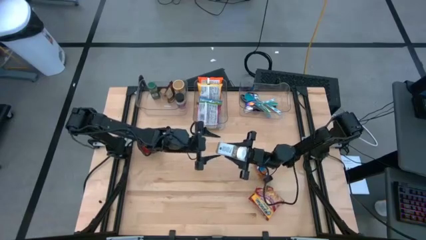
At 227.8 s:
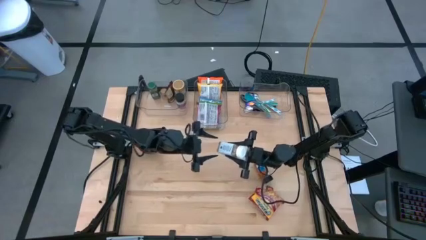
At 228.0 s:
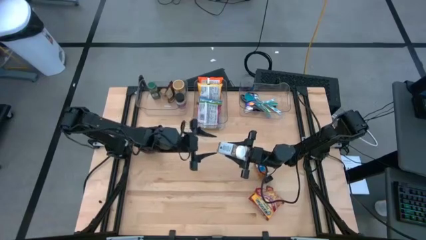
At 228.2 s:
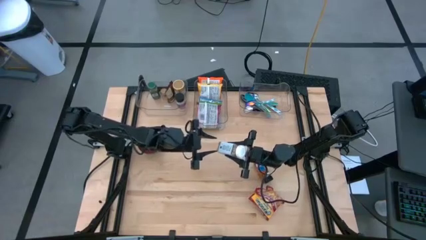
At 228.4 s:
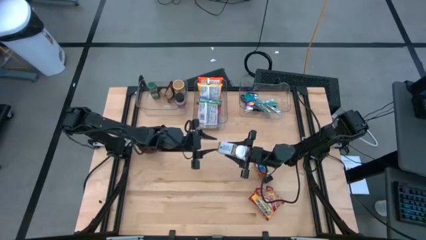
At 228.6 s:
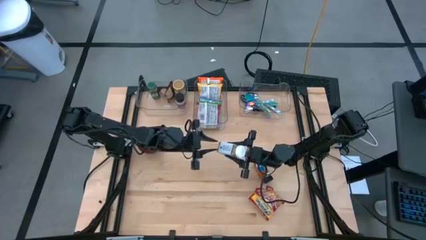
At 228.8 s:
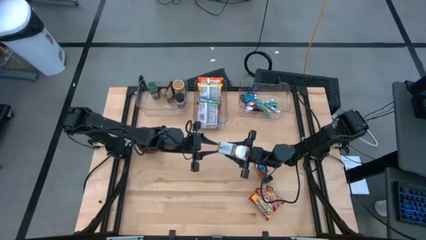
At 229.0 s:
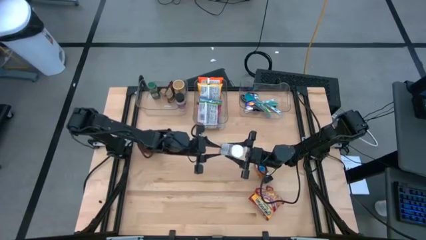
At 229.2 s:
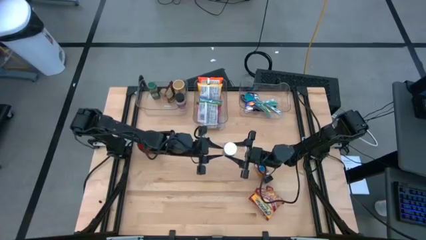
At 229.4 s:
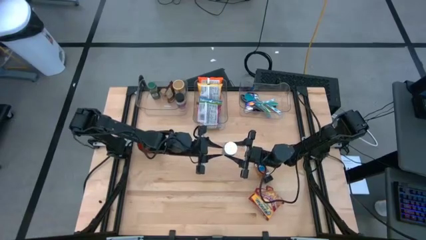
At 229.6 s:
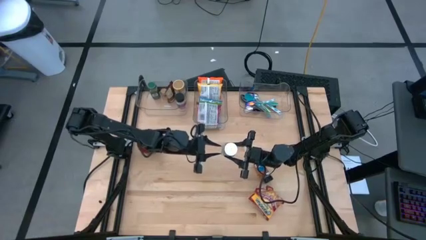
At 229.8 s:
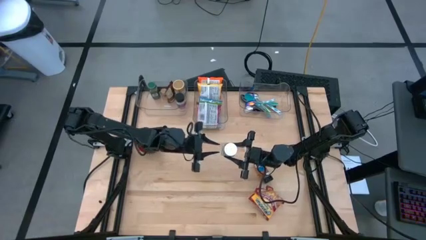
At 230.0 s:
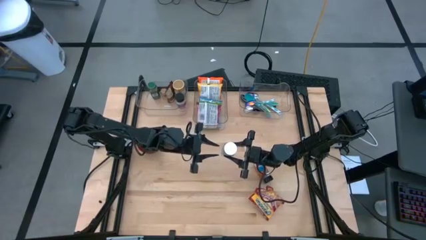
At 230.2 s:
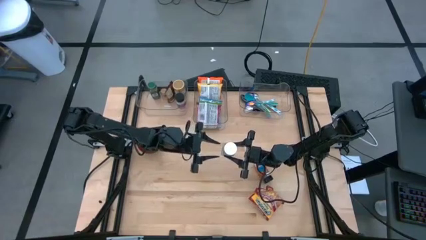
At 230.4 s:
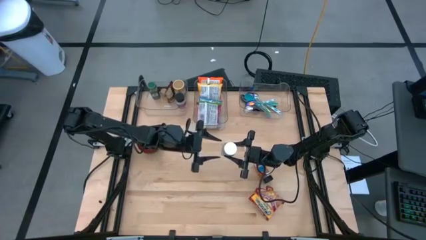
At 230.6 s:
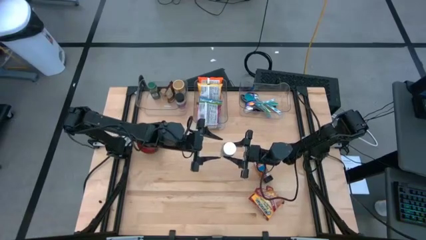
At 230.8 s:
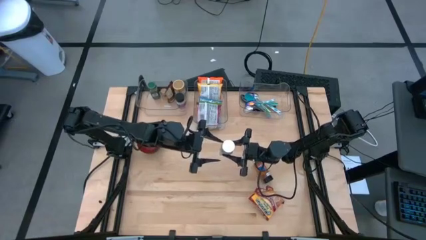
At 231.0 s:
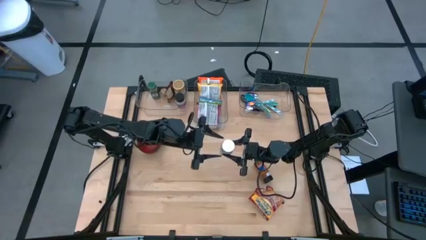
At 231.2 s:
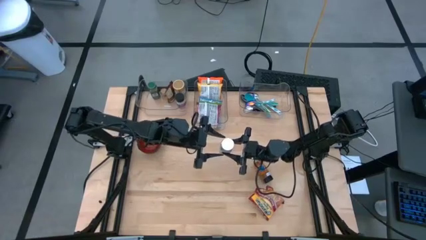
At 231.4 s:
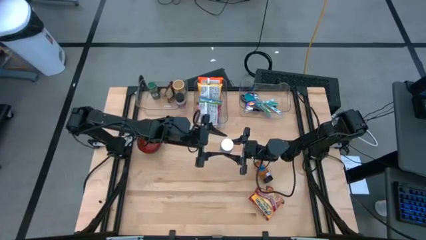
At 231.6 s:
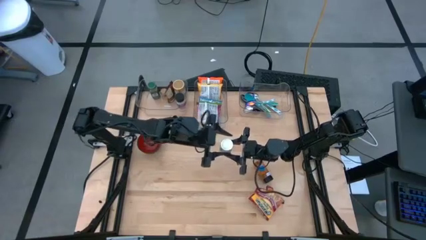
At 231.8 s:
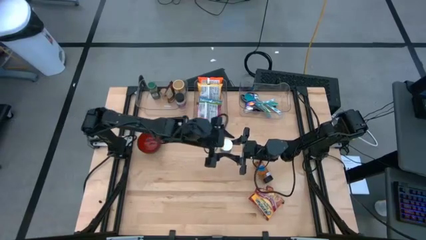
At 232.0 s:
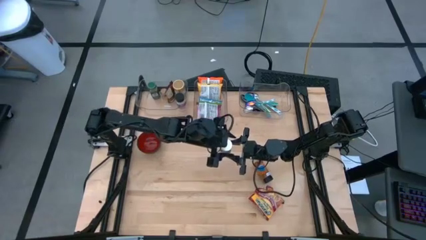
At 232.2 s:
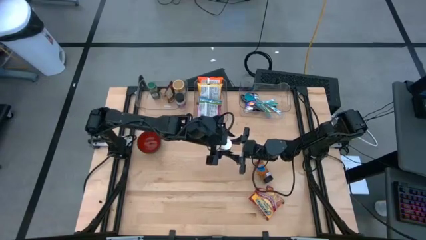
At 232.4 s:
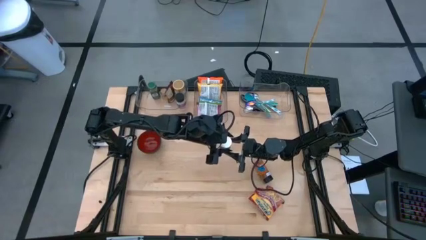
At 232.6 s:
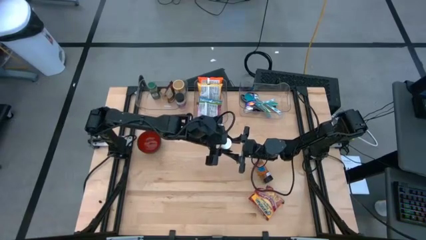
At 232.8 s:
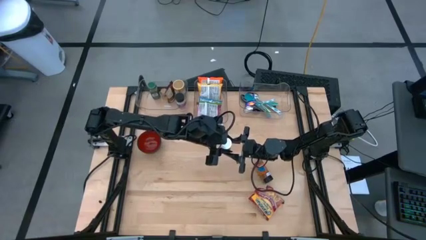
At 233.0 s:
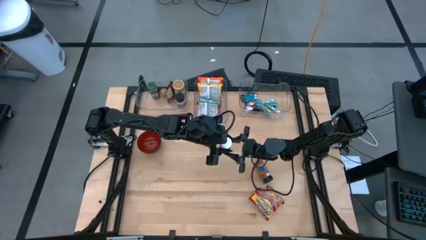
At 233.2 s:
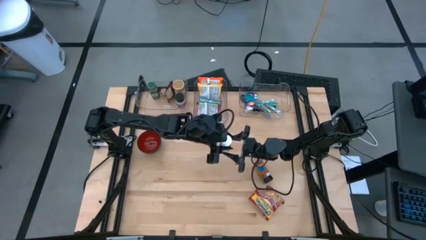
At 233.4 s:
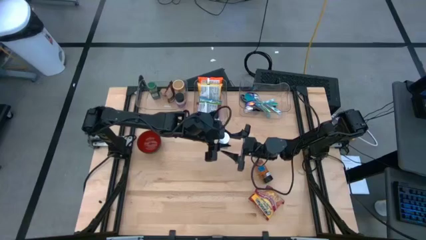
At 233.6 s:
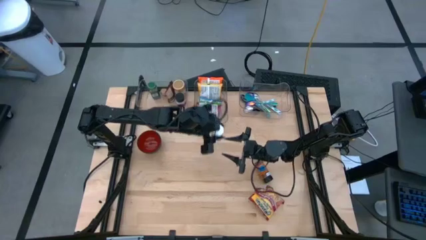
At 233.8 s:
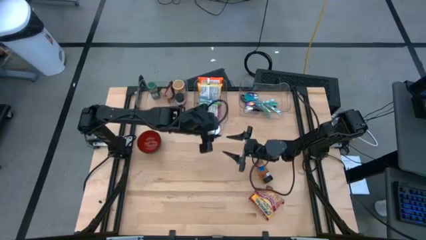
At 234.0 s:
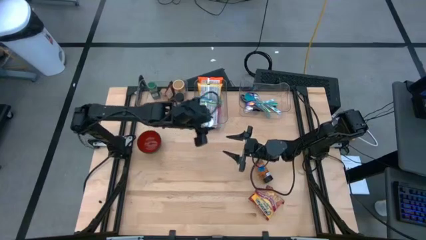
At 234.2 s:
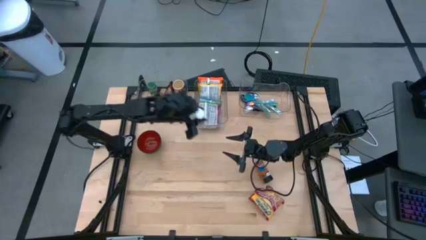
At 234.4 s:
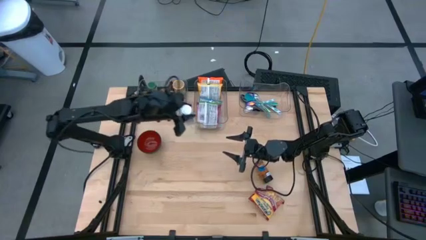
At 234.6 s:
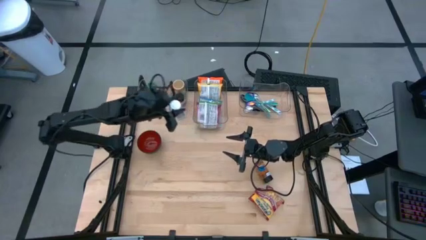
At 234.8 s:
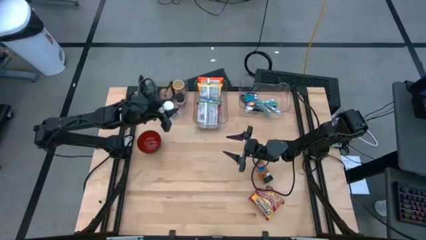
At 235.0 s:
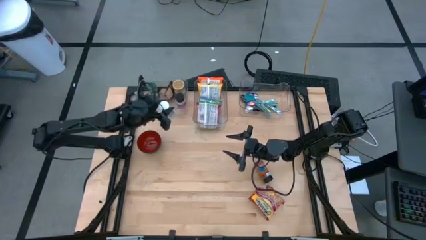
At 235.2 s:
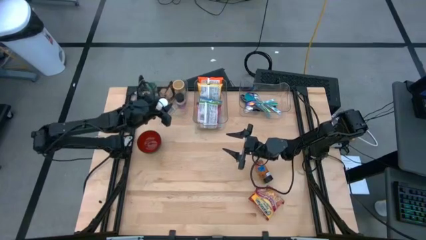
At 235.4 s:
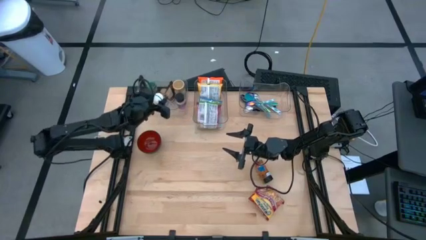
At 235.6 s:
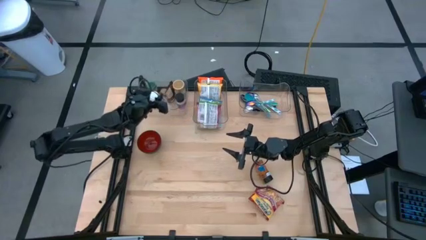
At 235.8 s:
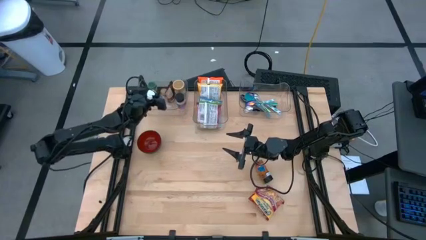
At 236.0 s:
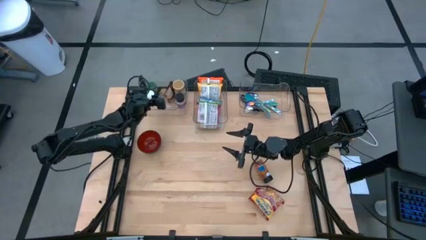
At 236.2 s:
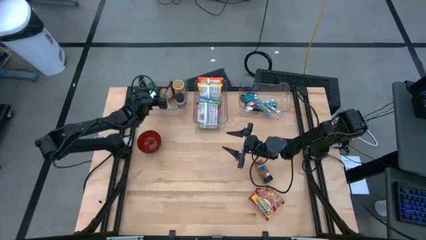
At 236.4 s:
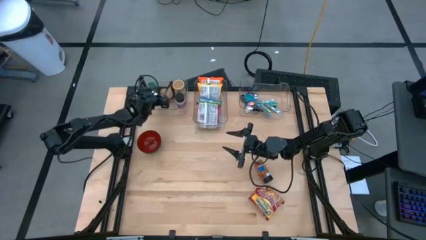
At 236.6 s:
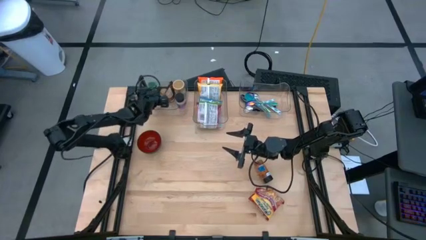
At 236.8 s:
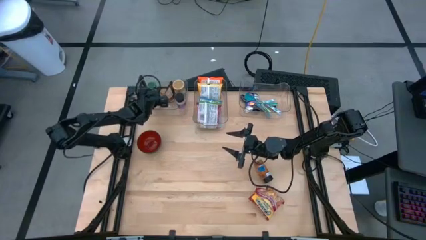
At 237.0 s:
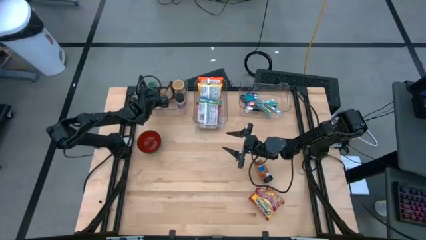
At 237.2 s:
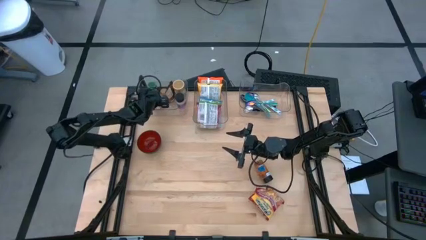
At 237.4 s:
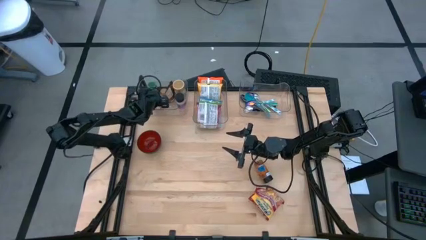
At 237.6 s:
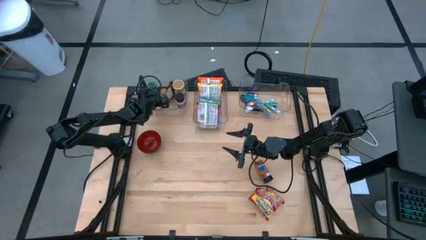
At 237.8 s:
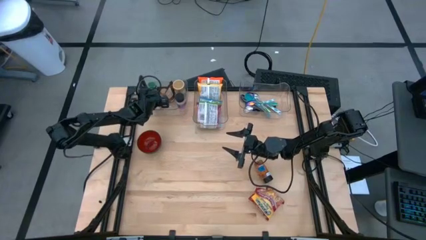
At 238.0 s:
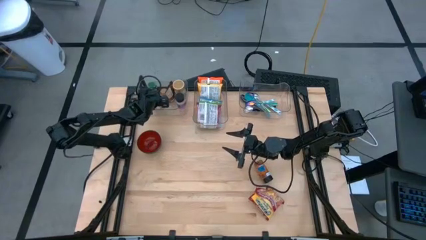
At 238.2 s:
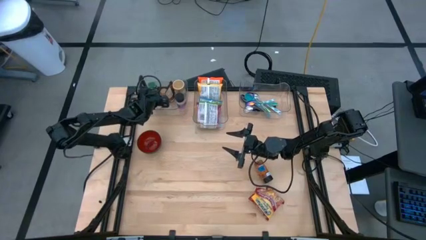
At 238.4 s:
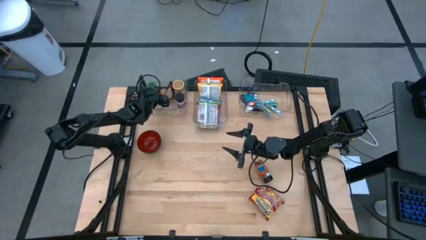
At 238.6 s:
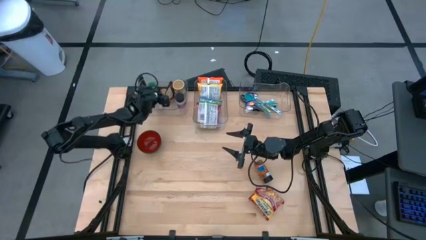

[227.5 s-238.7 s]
Task: Pick & Place Food Item
Put the white seasoning bottle into the left transparent bin

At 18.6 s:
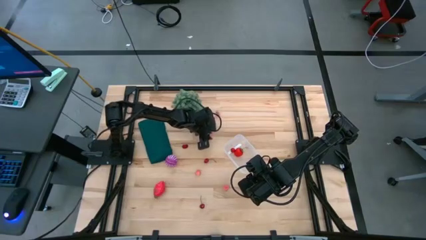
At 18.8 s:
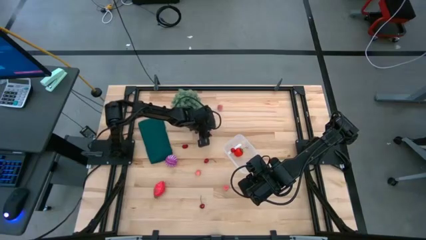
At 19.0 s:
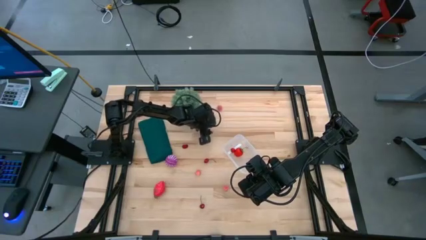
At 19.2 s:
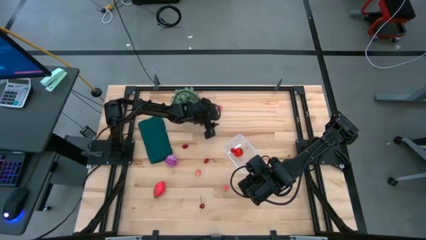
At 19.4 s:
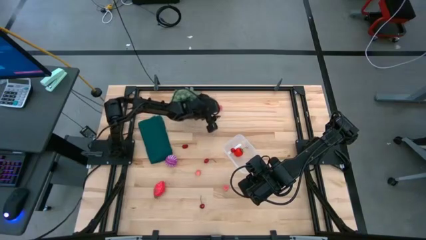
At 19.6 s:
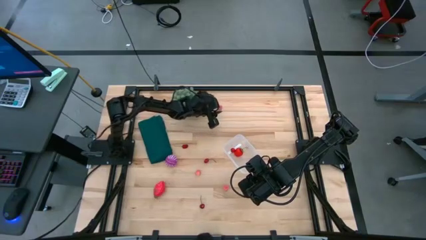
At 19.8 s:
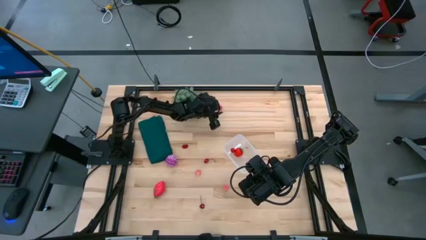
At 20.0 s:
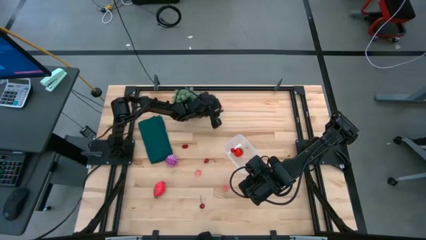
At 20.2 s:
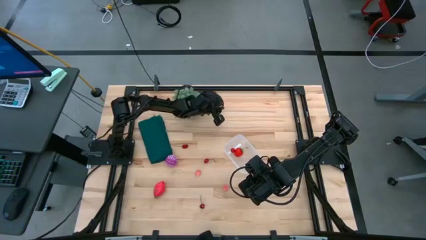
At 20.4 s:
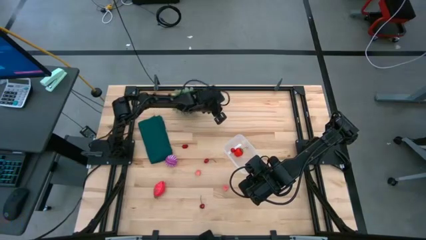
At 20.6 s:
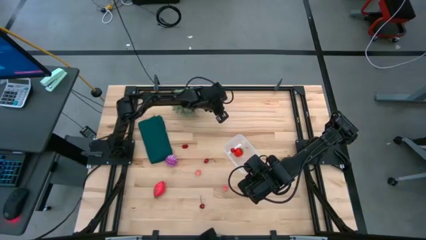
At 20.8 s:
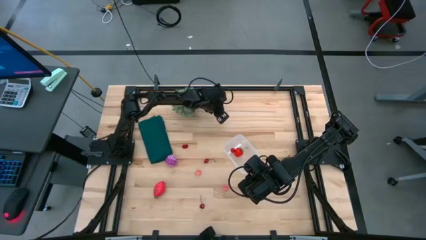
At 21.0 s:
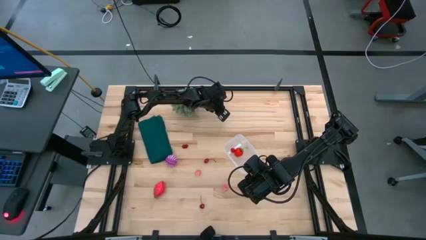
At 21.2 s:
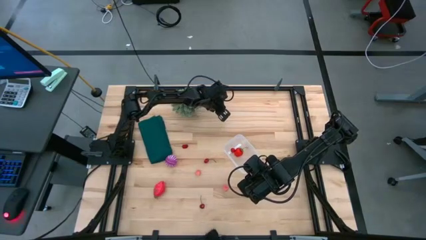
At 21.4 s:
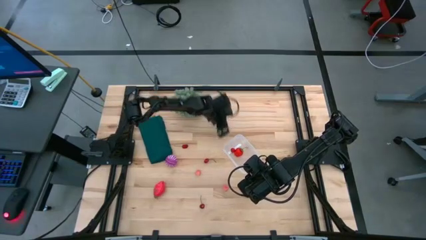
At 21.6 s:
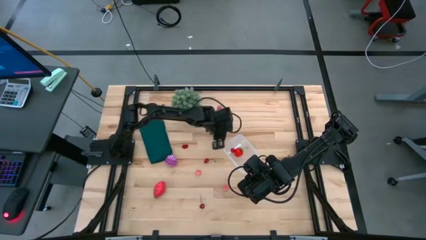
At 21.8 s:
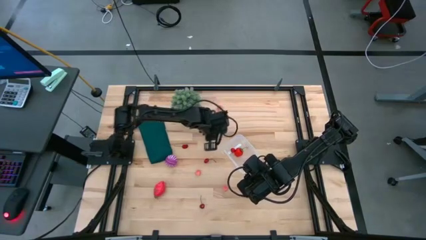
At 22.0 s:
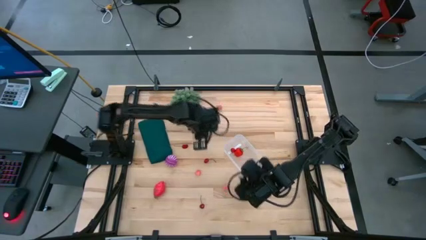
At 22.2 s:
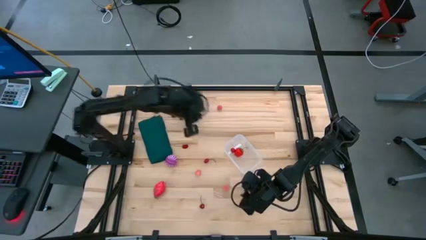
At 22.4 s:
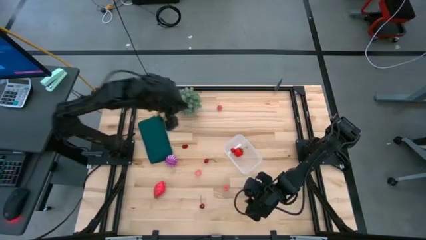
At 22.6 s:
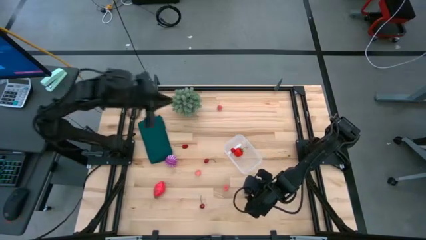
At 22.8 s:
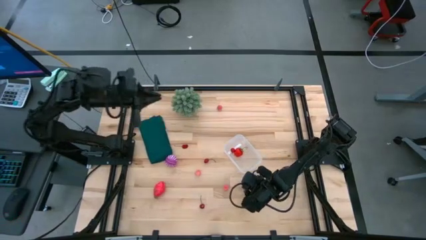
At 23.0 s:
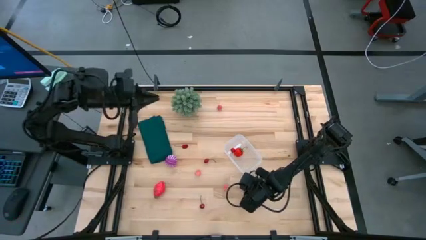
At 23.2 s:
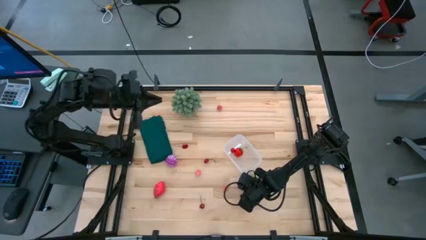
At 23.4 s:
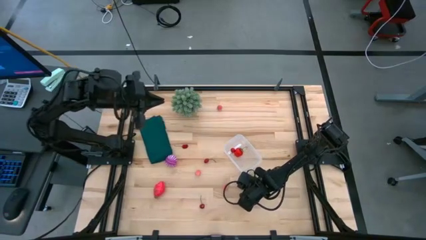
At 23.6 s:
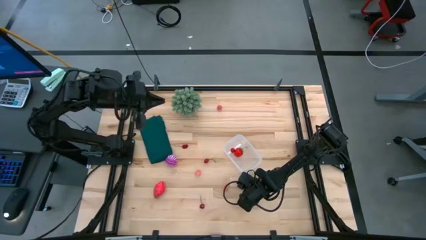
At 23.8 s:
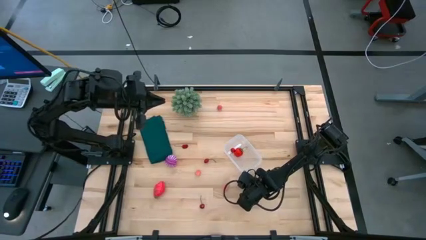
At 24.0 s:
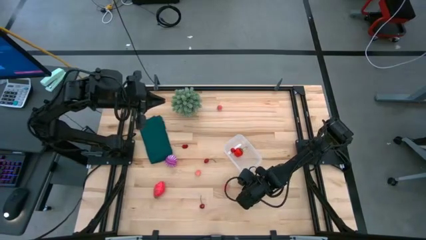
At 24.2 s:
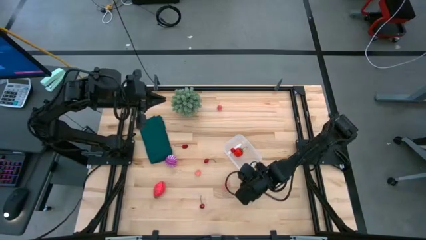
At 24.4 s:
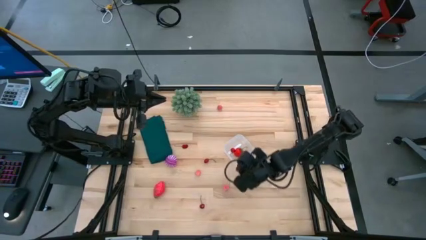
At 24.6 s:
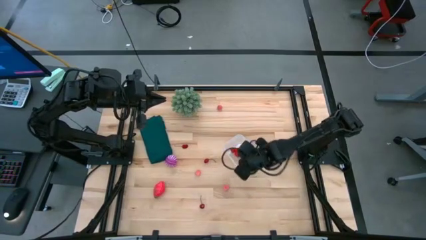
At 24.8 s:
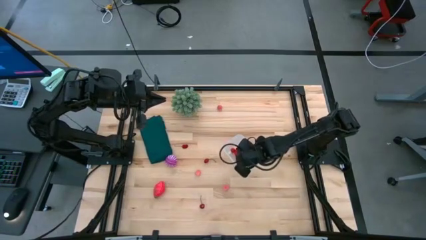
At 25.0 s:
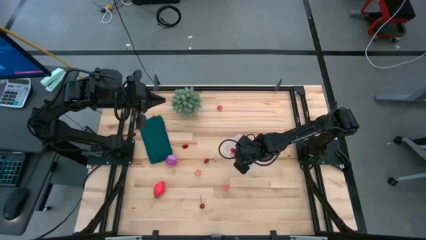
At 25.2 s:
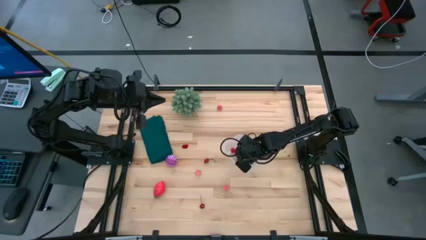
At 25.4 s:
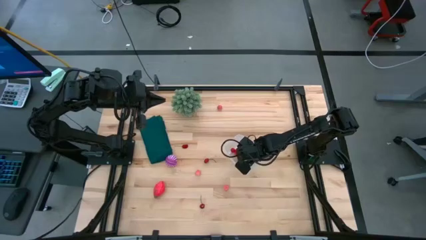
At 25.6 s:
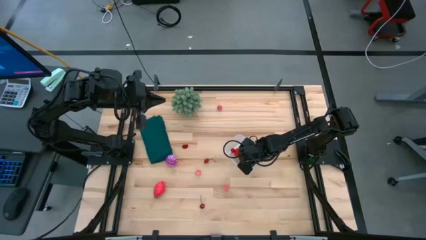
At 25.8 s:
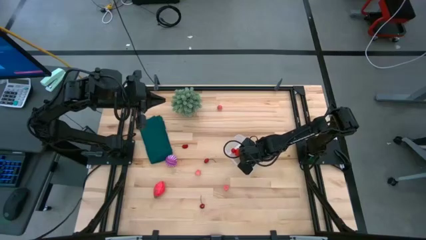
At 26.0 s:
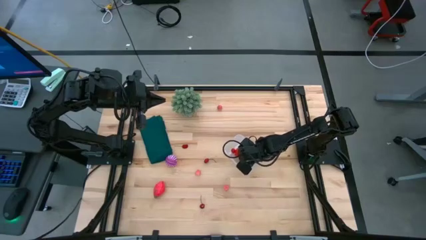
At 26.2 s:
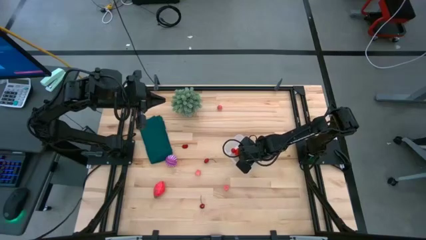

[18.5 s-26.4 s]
Task: Pick and placing Produce into tupperware
Put the cherry into the container
